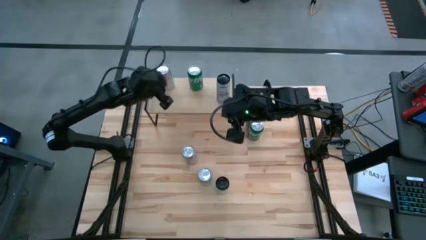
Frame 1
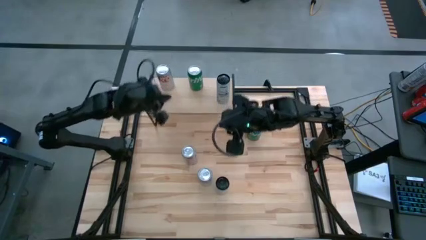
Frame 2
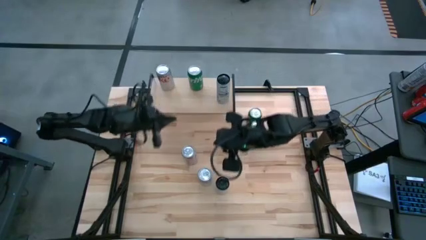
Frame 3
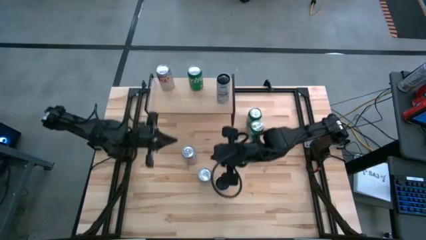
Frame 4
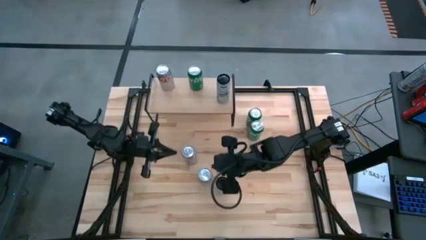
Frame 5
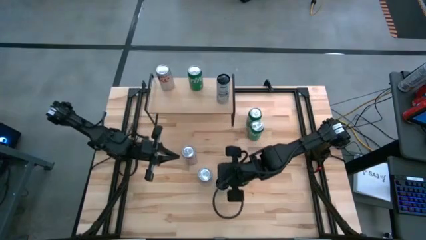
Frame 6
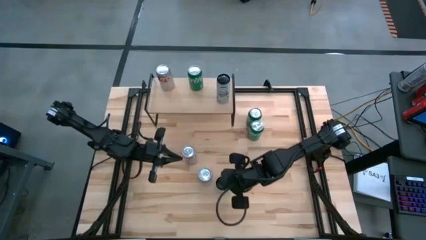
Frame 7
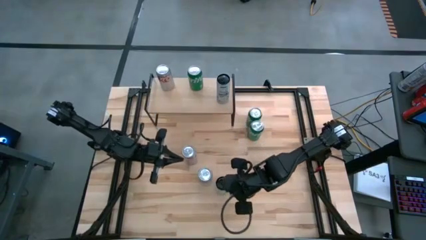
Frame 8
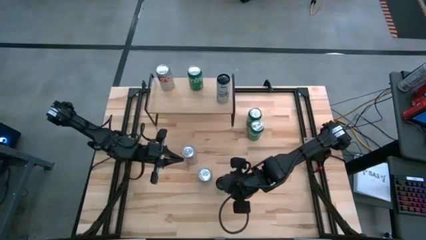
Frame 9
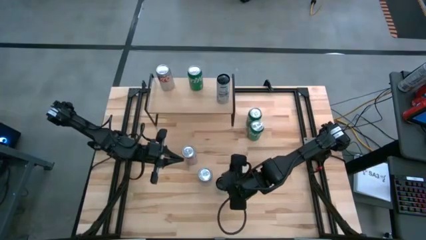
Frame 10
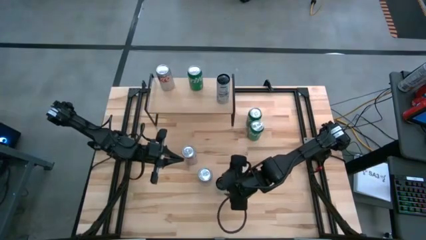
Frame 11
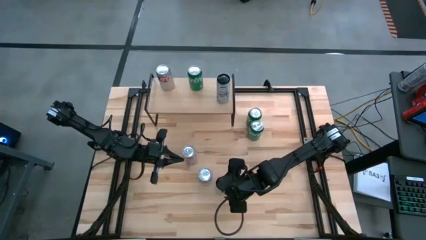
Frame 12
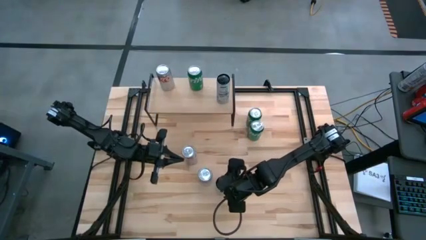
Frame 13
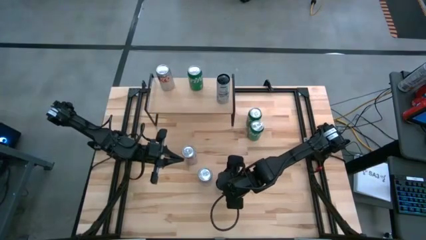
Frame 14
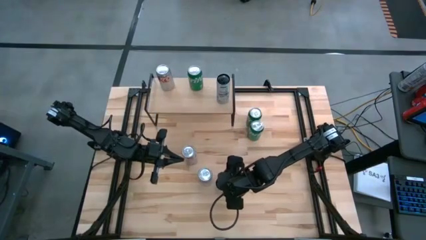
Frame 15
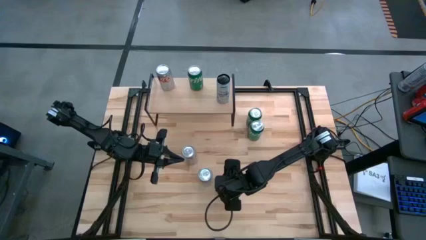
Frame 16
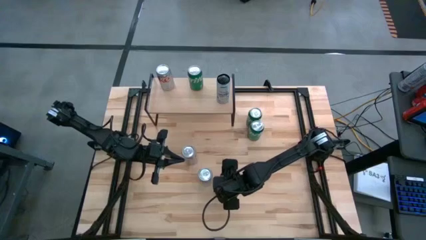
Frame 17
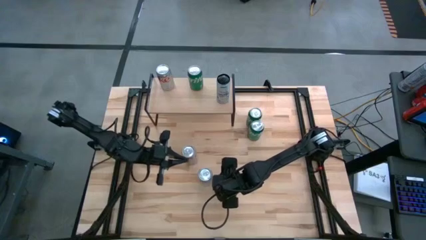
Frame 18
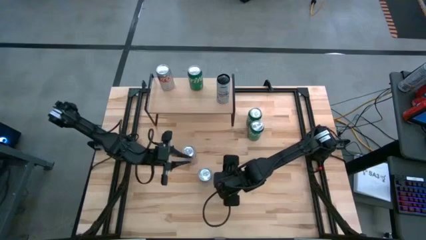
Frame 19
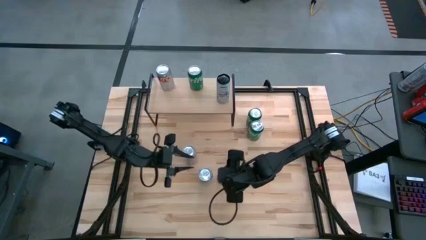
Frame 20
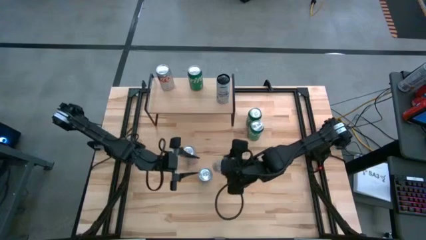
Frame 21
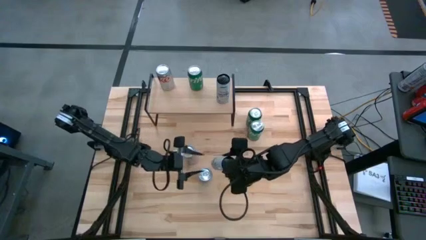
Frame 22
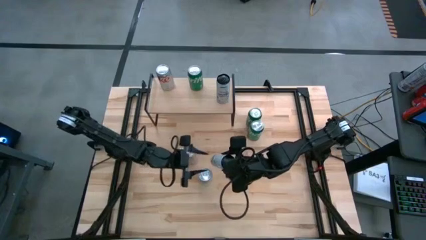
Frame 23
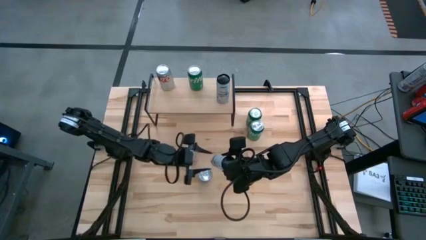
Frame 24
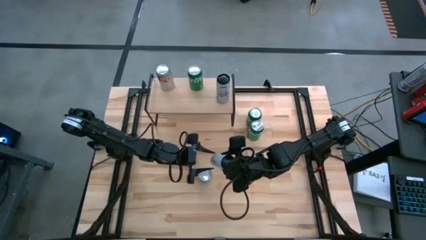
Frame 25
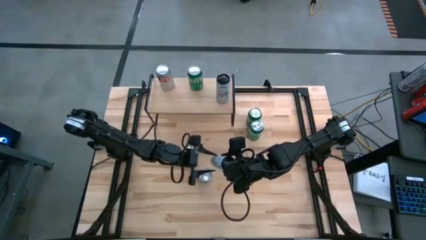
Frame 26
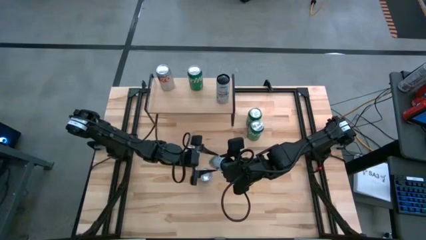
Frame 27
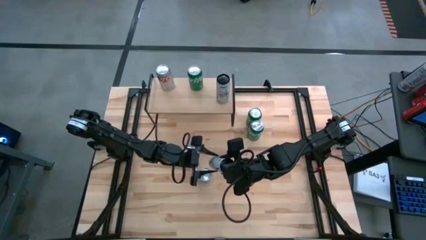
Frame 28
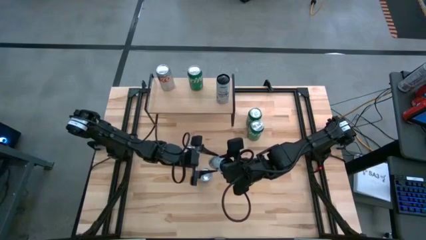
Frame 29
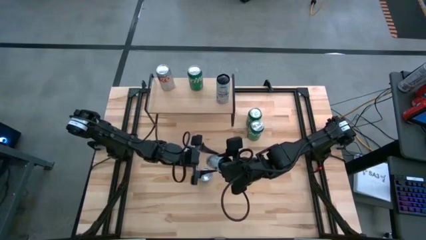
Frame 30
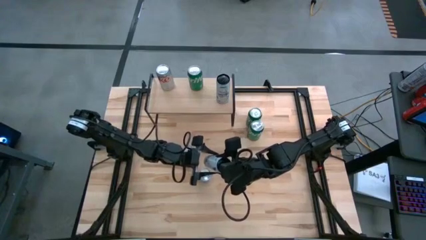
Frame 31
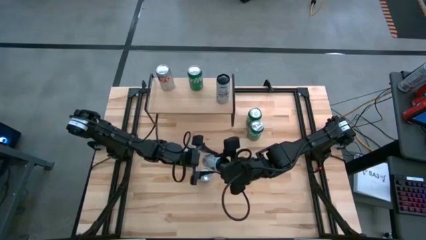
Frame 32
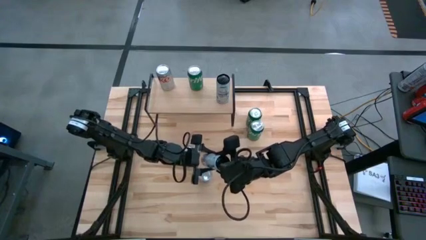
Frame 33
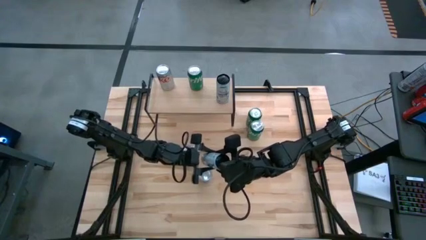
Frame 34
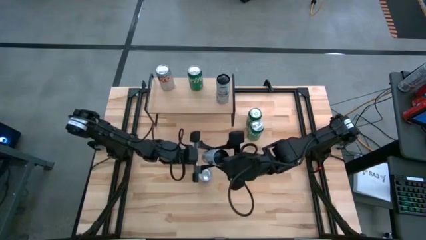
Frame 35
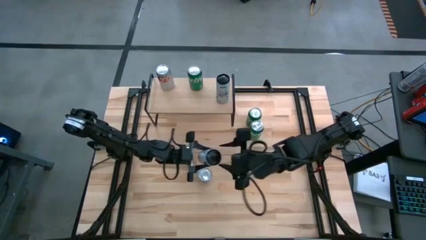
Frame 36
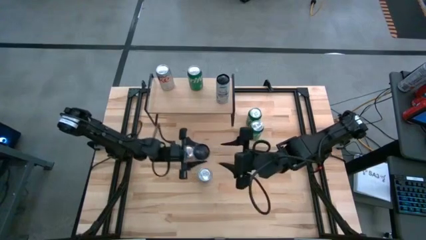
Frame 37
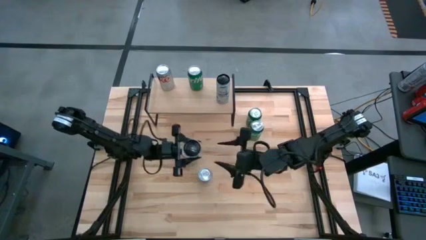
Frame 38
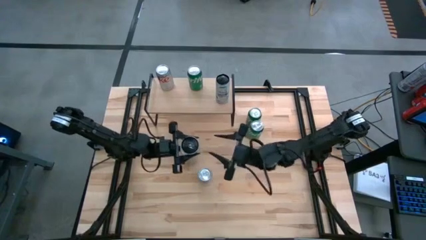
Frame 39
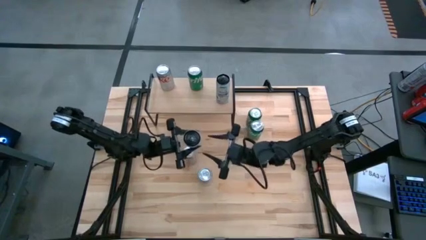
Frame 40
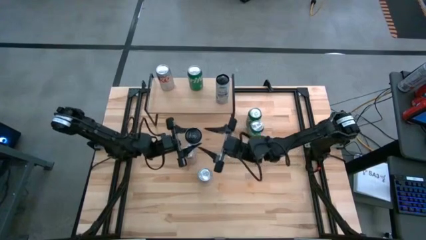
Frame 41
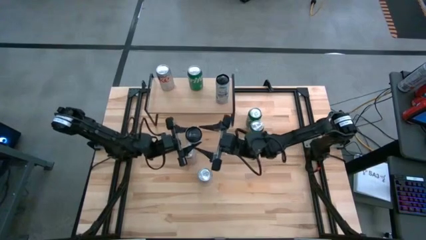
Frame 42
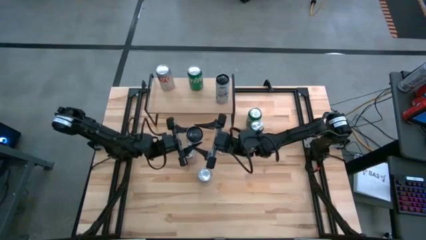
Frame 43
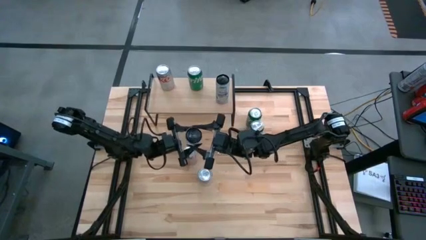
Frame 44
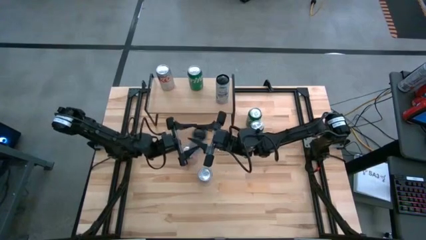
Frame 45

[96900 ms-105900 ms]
Task: Place canned beverage on shelf
Put the white-blue soda can aligned with the other white-blue soda cans on the shelf

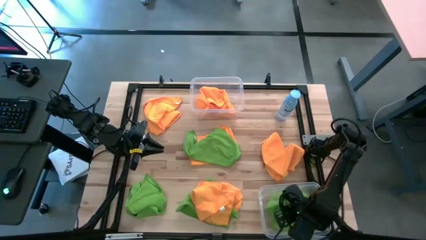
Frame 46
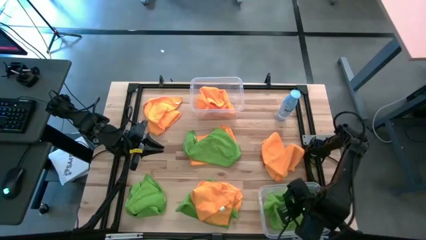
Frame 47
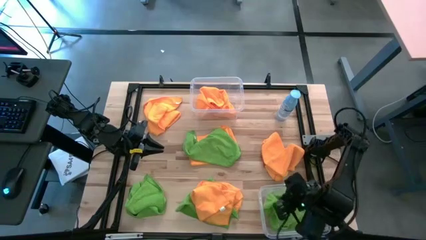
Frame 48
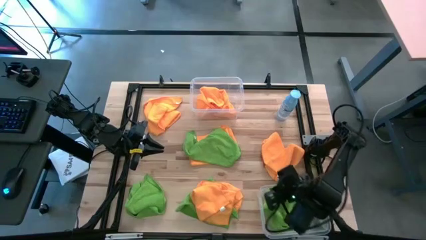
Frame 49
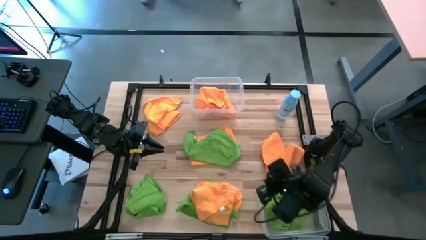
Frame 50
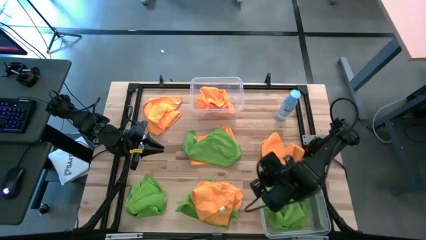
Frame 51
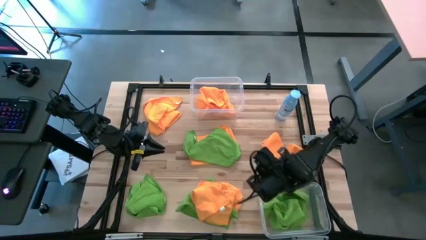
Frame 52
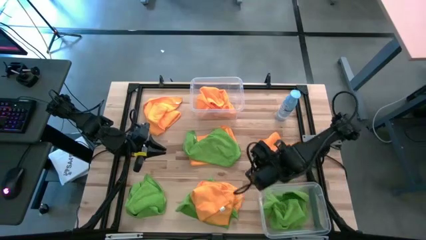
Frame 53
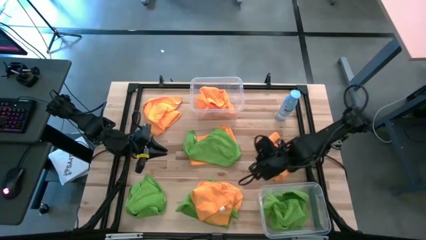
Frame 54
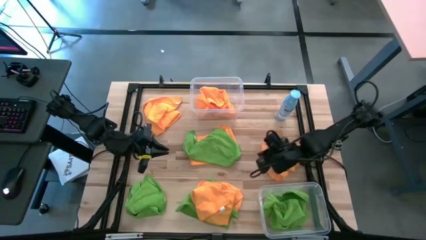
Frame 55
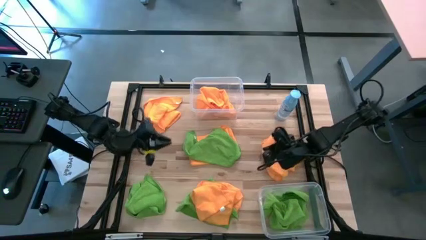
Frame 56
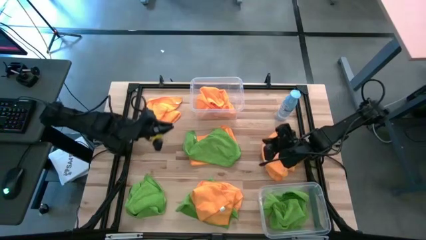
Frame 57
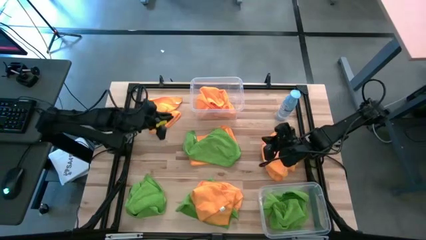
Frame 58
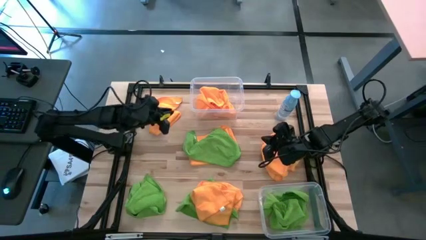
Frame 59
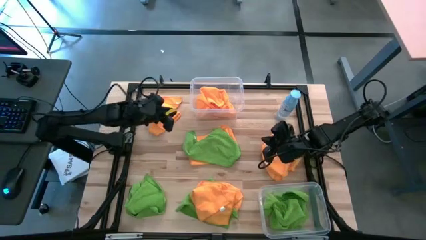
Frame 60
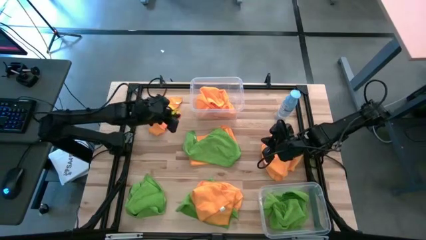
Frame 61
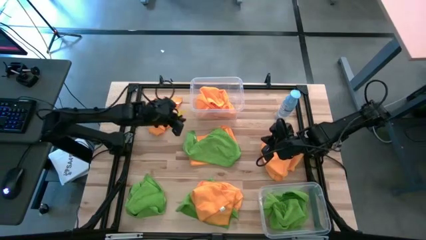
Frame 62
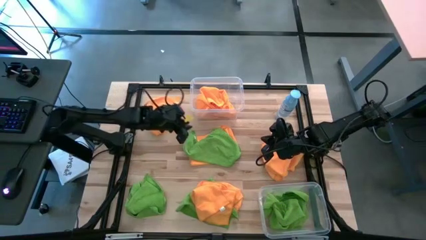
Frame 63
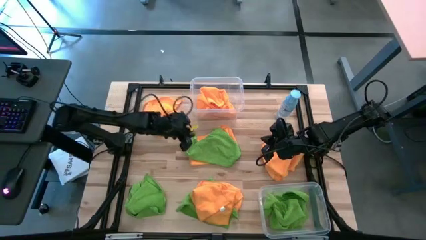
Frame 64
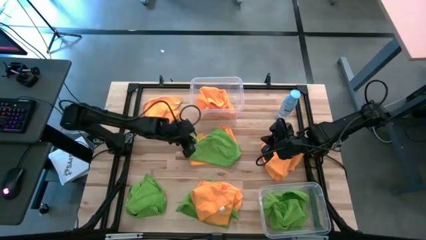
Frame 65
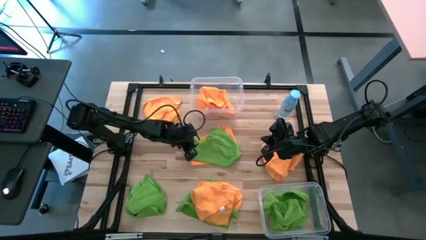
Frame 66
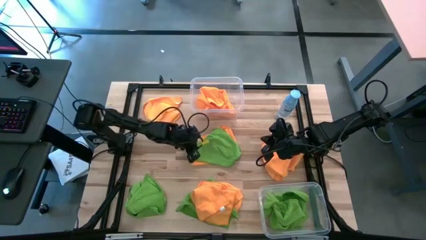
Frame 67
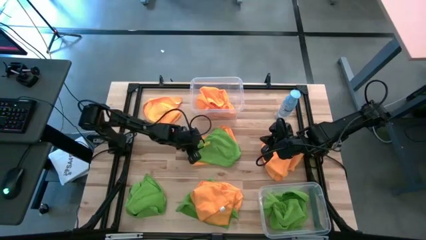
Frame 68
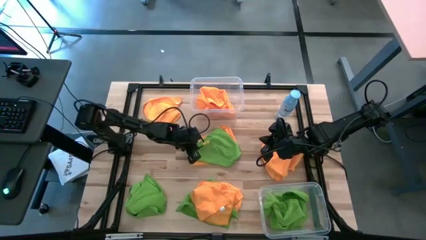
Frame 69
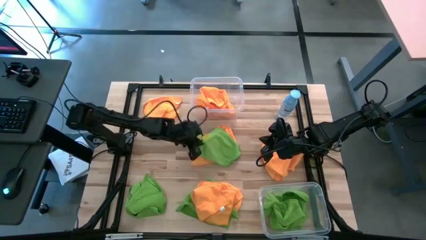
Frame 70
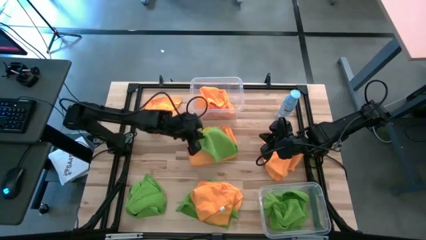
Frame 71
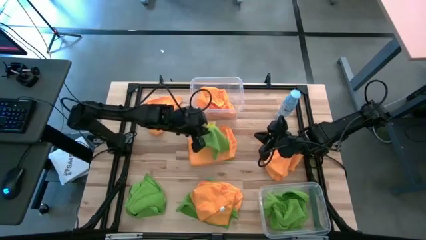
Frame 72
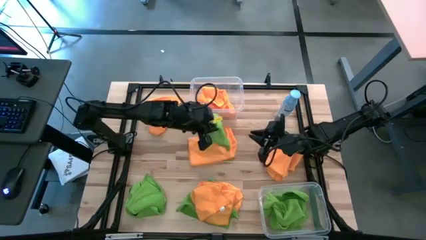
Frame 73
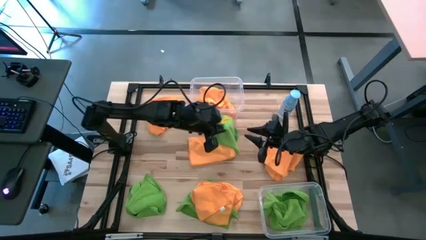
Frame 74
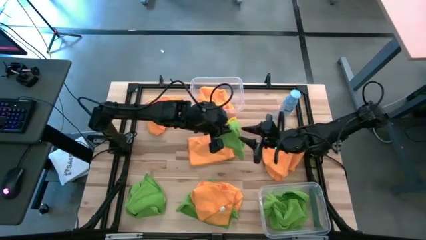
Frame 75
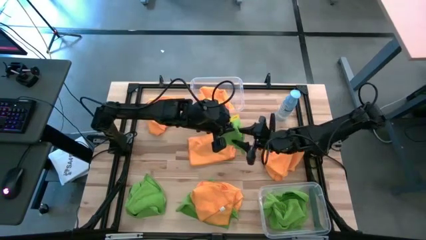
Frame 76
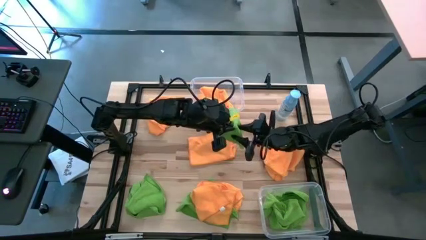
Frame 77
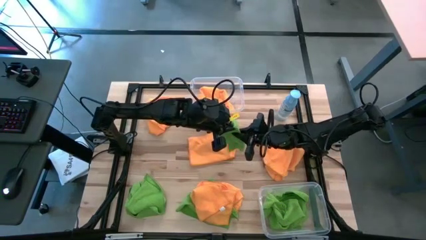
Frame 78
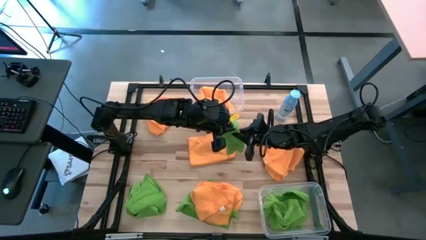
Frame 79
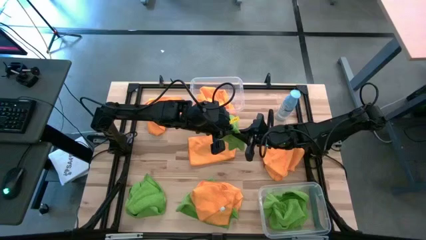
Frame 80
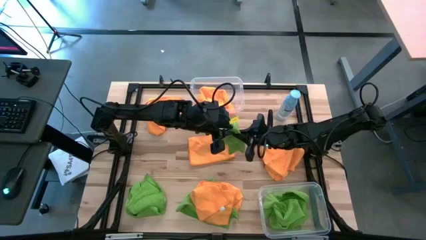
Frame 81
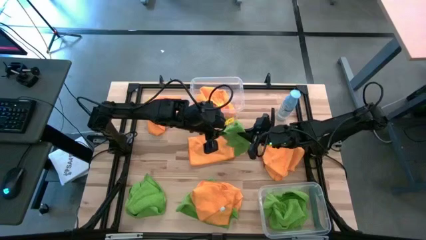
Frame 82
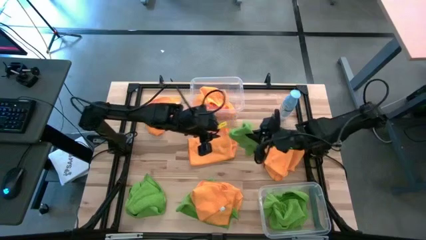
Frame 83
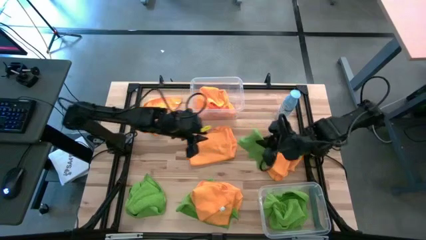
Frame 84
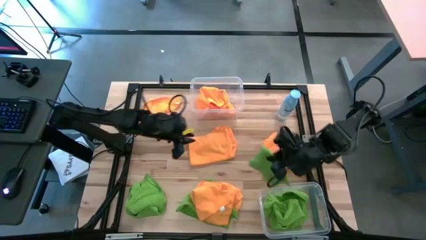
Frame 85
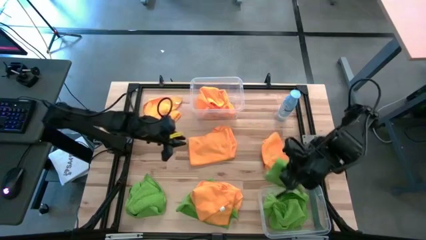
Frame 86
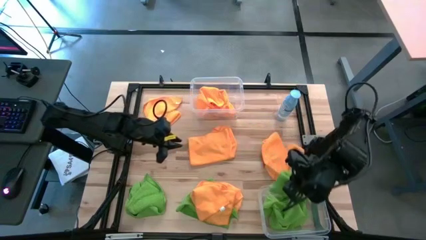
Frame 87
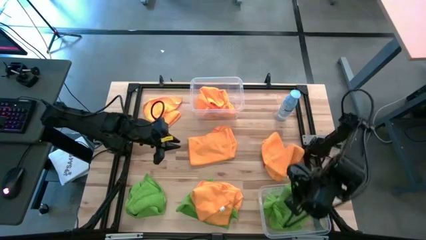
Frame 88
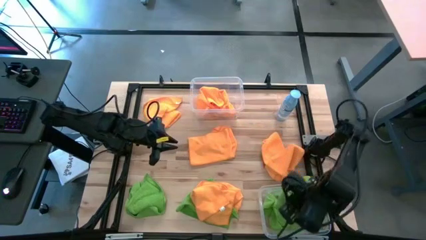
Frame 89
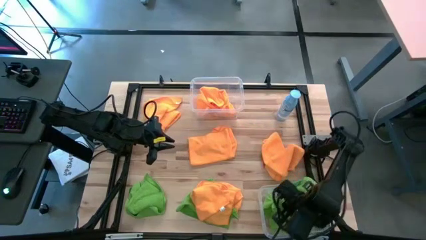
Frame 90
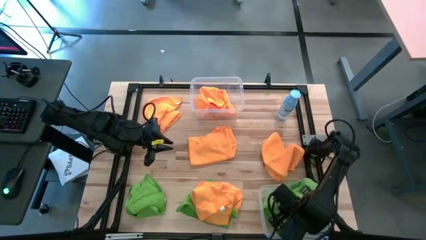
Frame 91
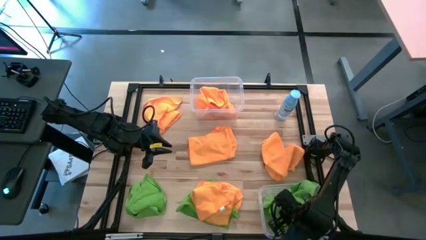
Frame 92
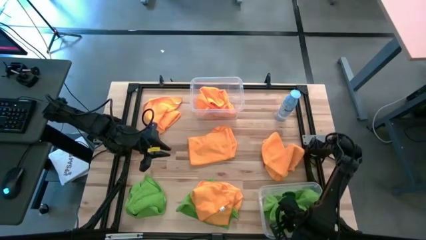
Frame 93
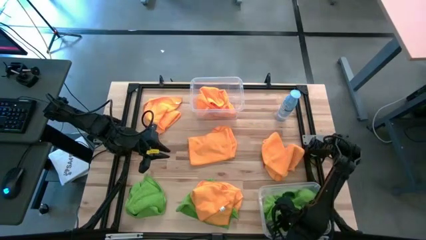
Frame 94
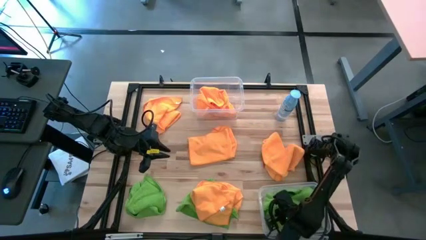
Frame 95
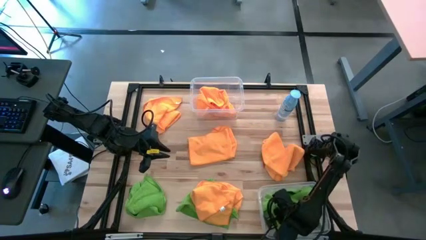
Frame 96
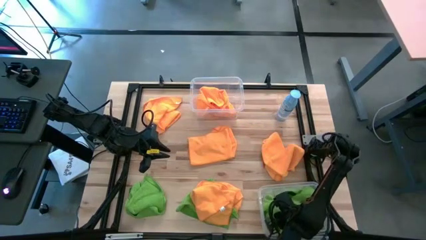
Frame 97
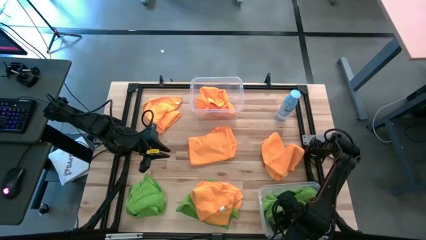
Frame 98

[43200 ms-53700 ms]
Task: Sort microfiber towel by color & place in baskets
Put the green microfiber towel into the bottom transparent bin
